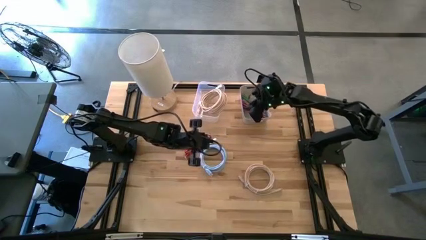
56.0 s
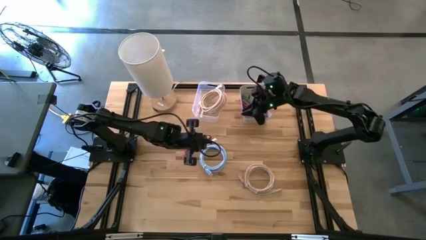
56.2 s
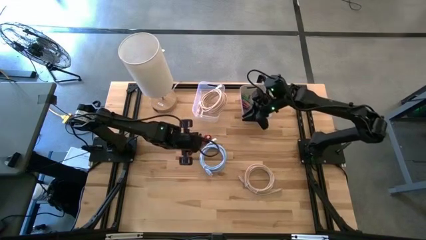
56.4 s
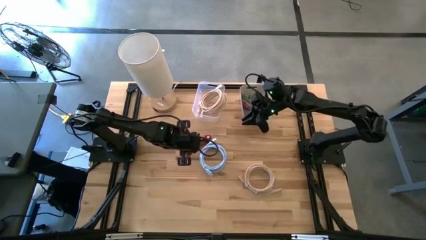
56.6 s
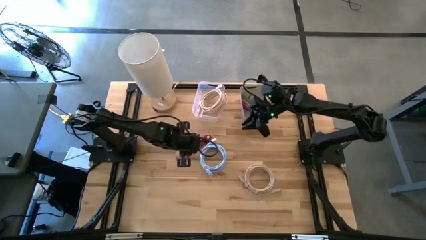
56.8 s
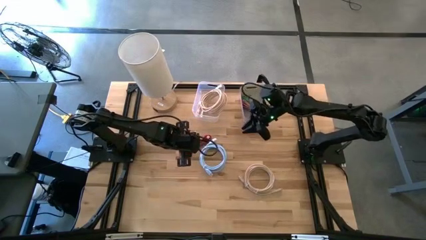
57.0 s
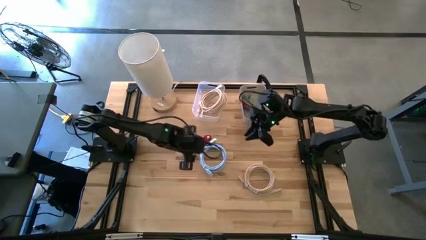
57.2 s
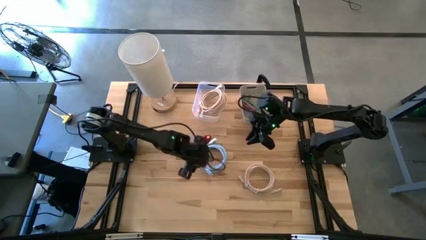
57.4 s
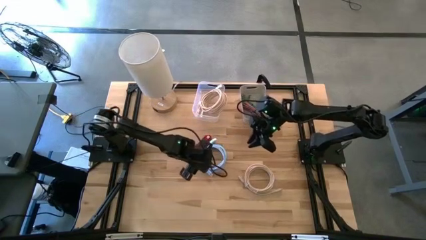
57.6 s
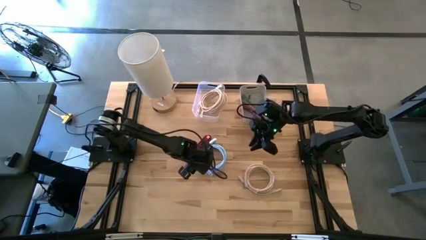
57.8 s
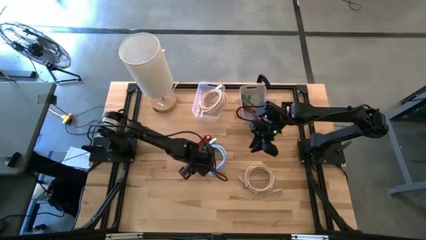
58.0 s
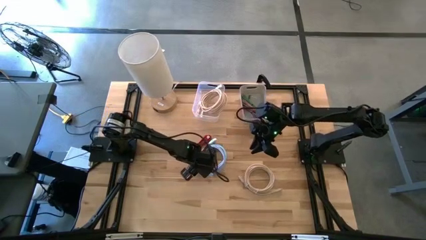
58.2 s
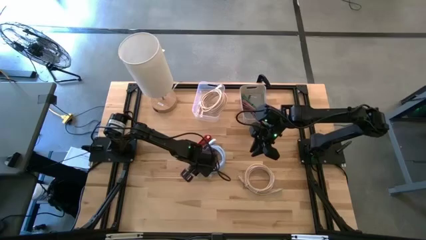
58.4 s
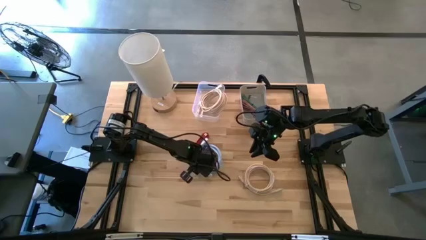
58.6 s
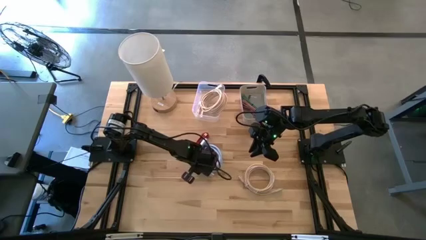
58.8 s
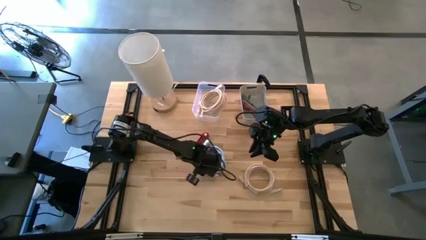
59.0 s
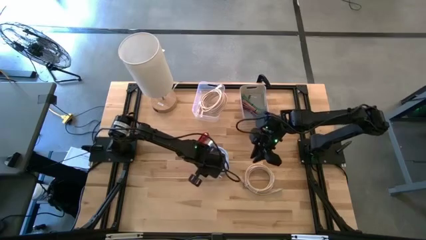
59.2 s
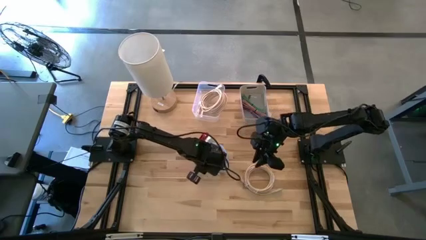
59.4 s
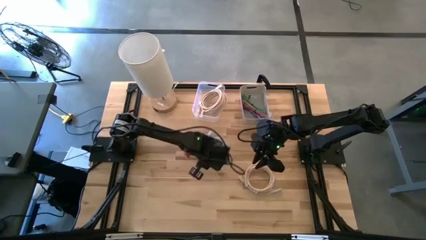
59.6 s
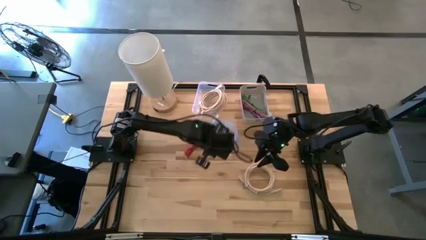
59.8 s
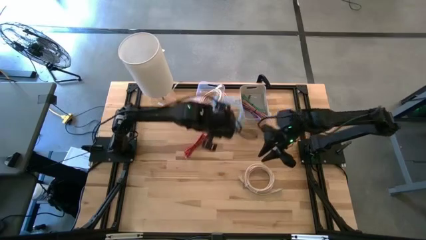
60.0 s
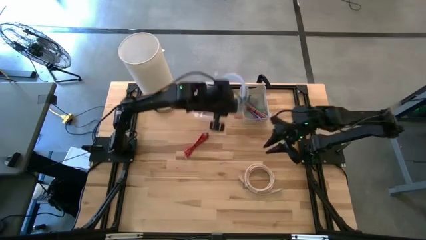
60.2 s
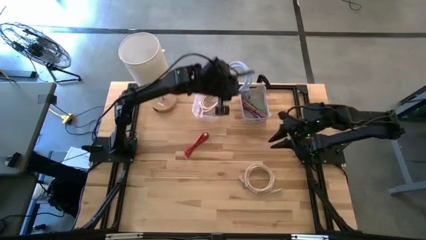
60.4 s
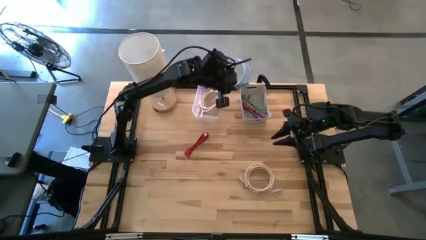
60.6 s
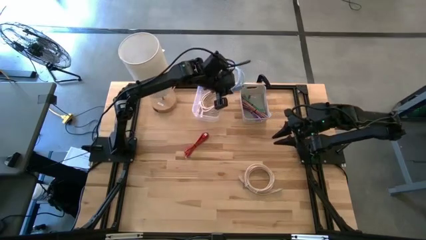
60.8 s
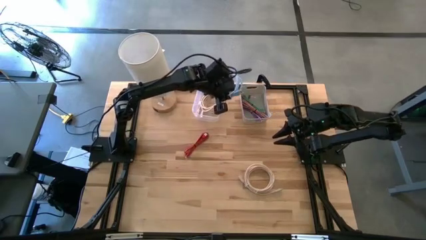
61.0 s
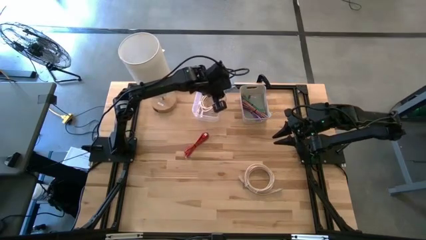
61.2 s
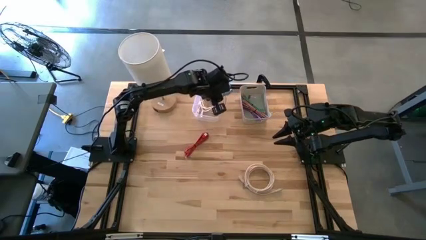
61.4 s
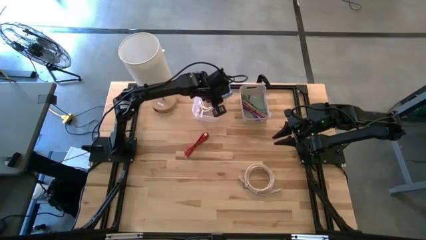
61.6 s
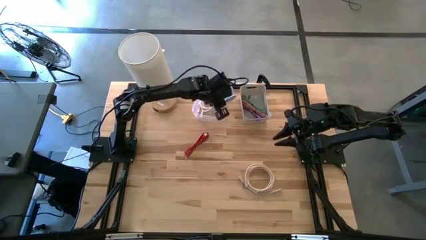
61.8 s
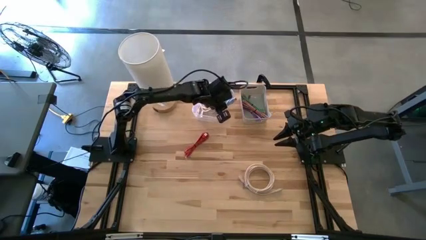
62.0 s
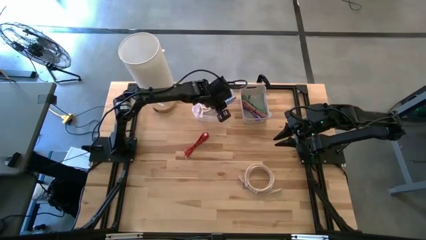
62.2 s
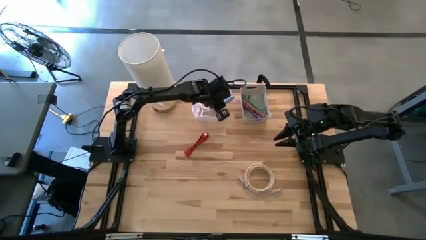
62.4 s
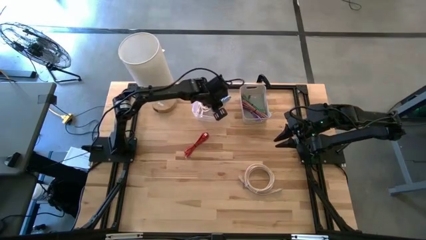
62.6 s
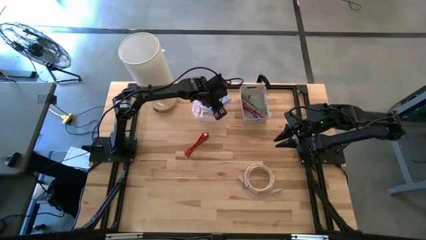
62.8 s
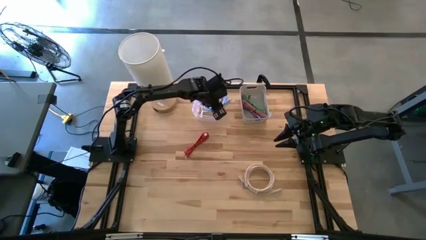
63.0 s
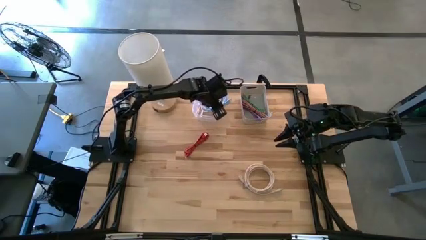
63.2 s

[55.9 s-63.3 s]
Task: Pick & Place USB Port
Put the light blue hdmi cable into the transparent bin

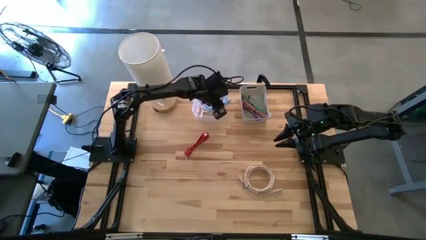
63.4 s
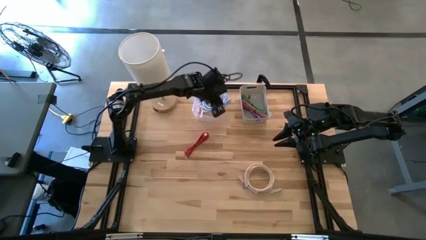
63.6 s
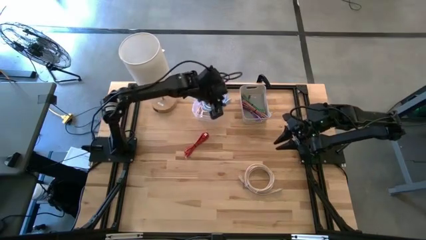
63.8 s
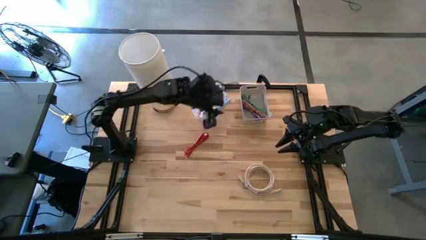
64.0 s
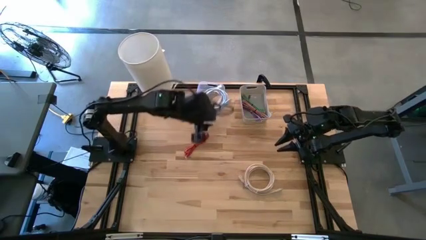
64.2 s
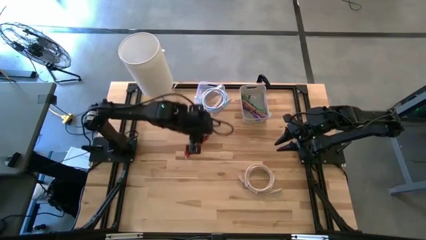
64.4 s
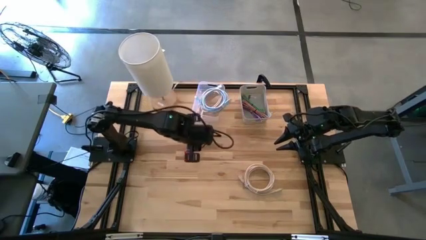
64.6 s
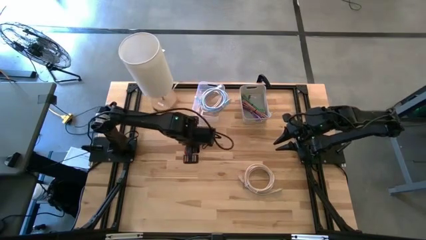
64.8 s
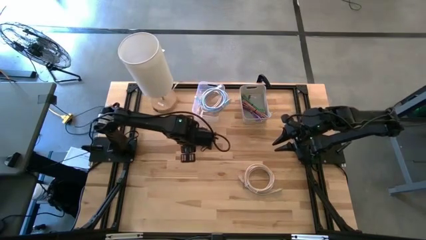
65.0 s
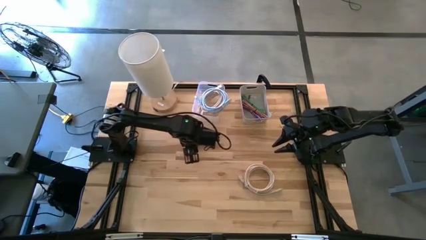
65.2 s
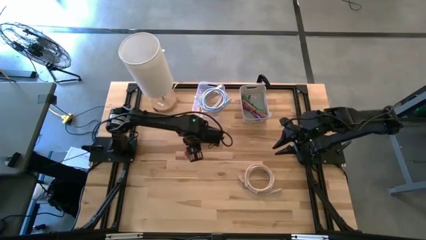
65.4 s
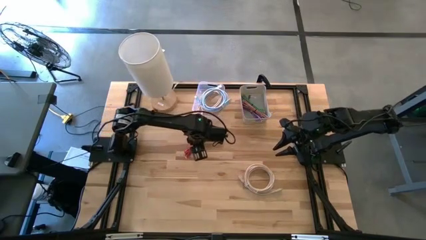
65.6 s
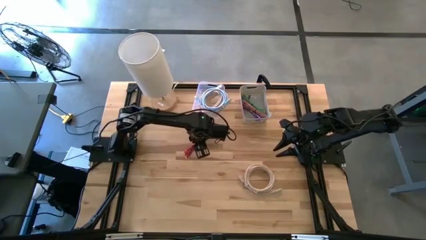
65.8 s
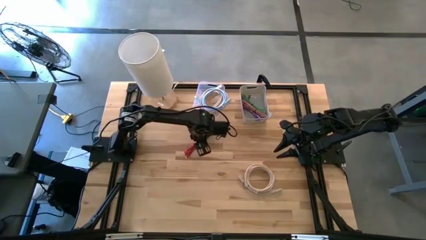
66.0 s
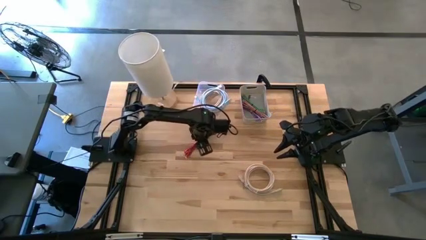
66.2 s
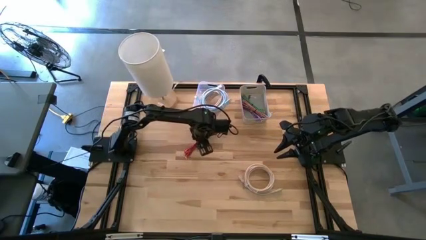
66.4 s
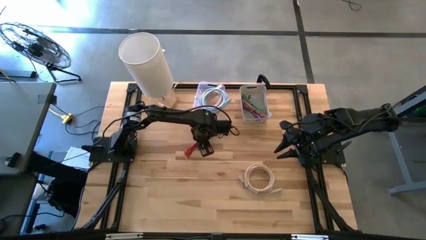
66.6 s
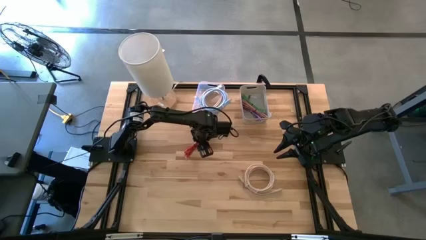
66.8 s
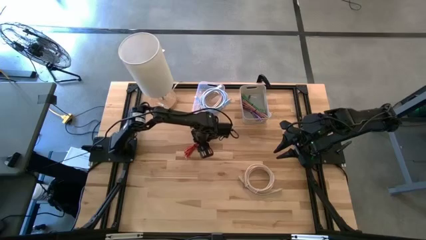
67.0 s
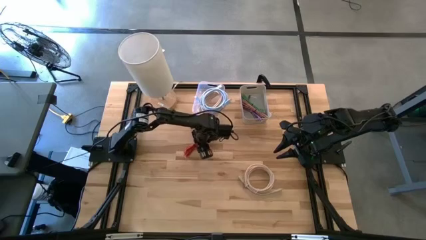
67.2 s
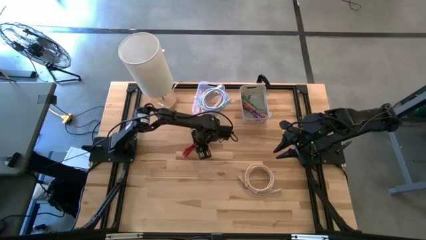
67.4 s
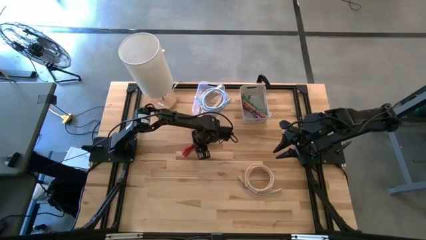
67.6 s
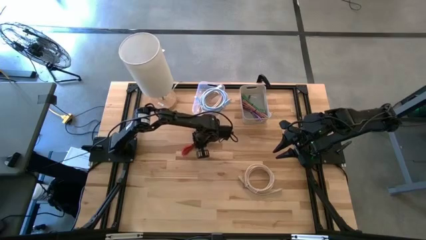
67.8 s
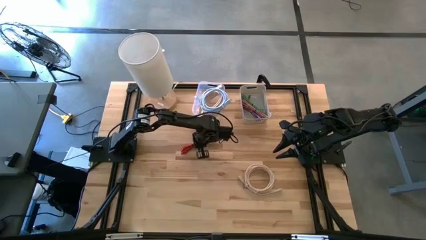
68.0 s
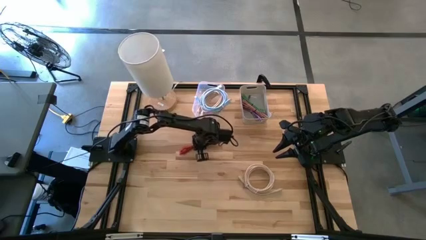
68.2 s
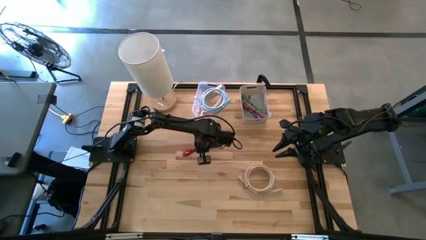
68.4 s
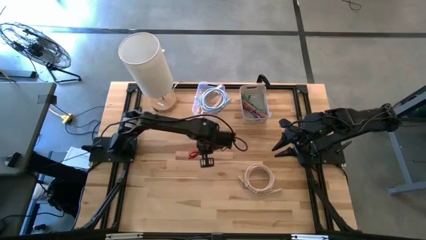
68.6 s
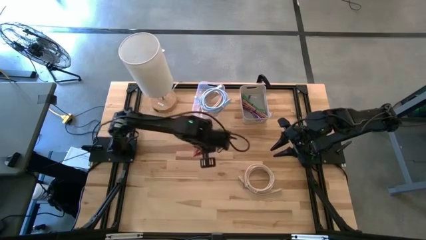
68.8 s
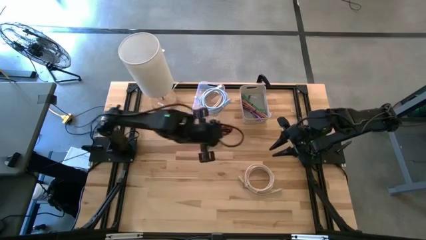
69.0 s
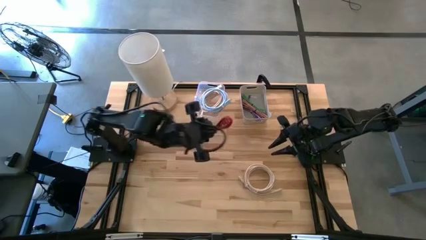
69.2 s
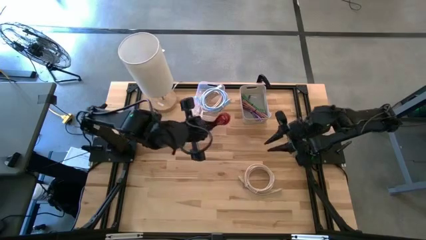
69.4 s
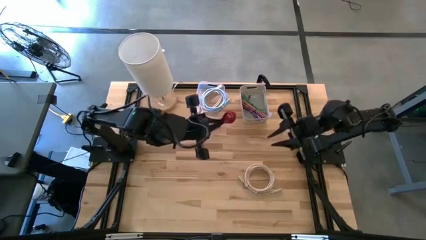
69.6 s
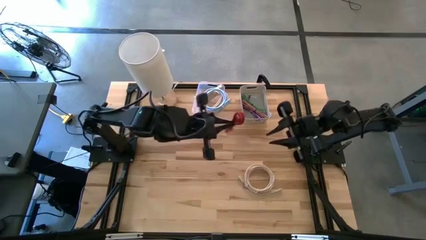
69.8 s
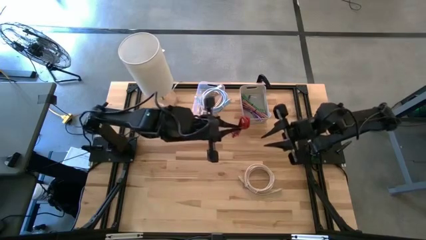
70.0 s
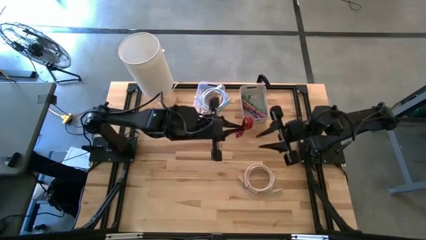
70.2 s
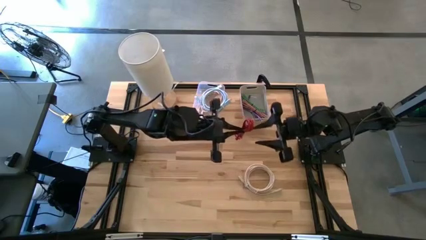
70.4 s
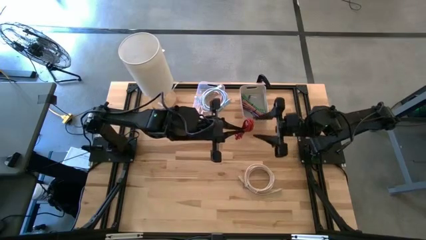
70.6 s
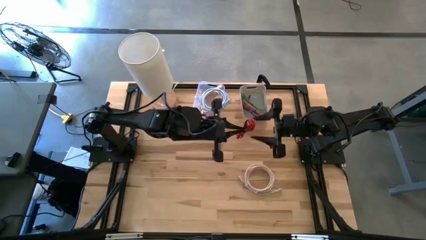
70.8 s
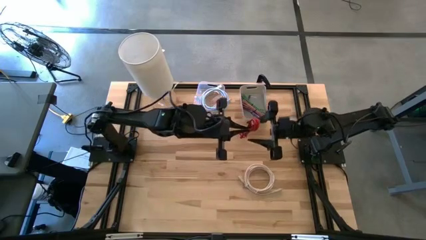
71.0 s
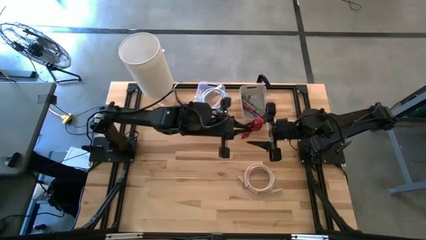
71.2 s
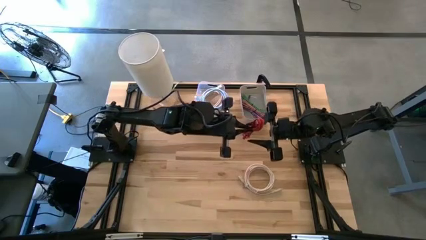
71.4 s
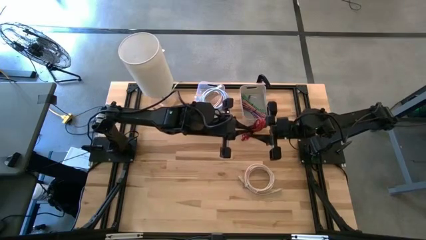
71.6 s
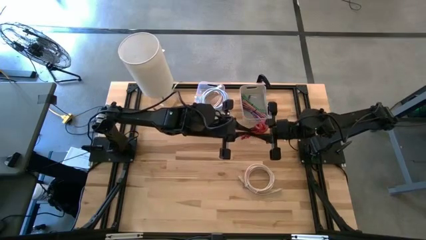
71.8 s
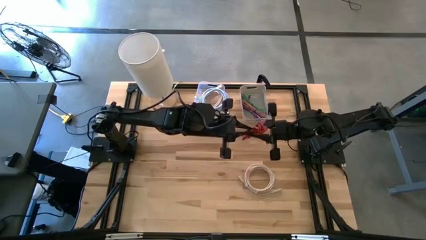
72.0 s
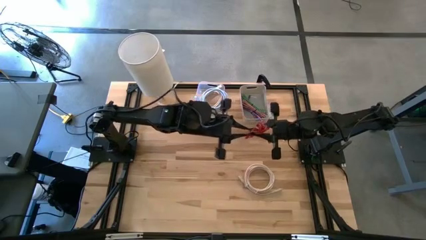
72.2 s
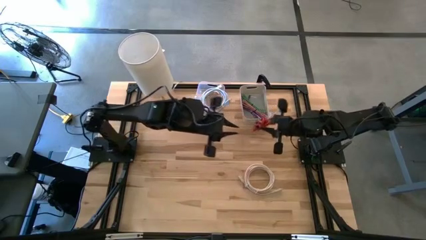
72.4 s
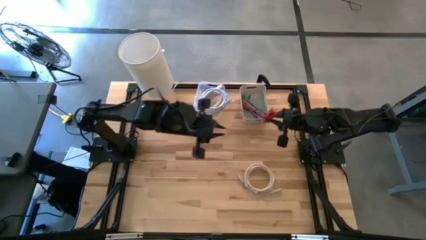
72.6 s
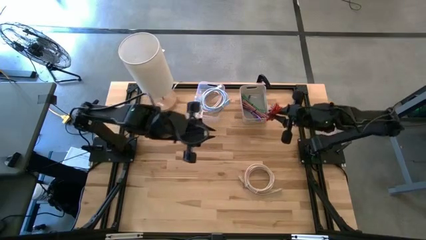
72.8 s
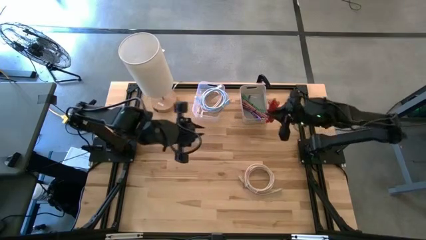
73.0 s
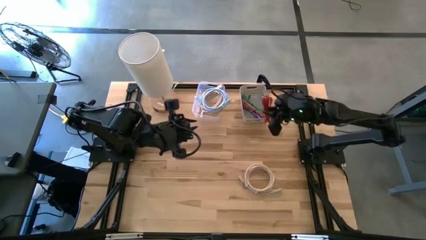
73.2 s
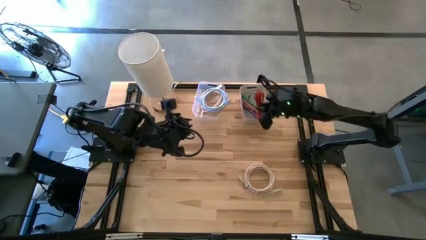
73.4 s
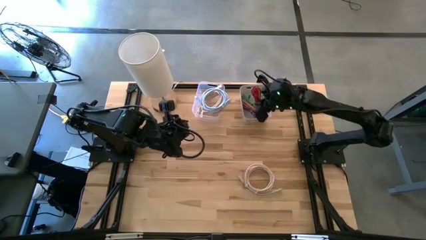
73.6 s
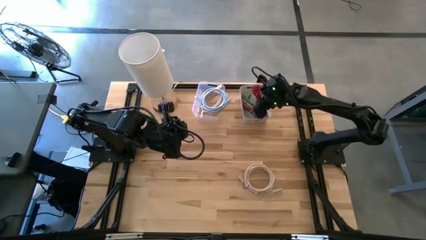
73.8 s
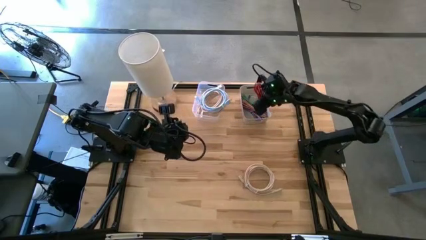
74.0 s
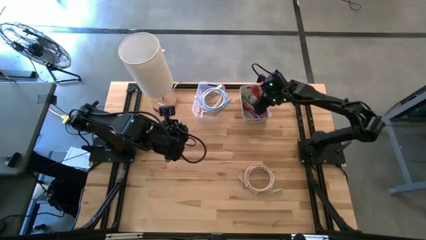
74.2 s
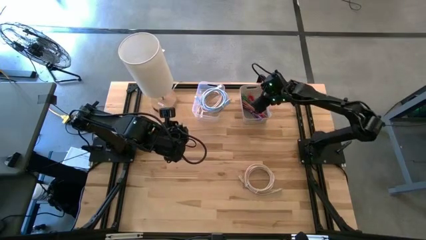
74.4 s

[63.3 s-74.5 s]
Put the red charger cable into the gray bin
